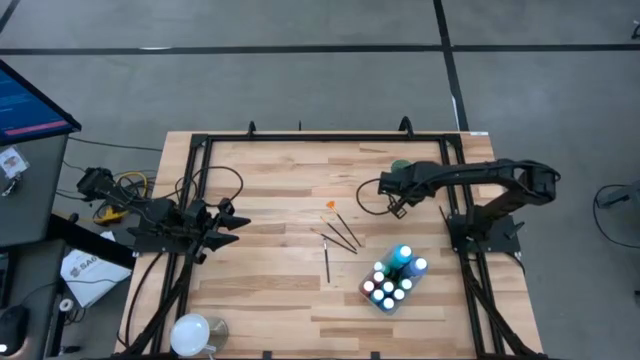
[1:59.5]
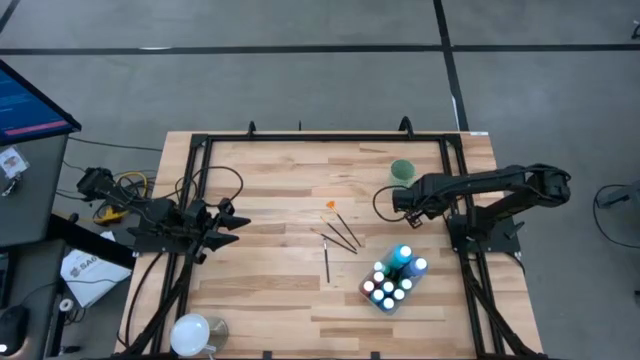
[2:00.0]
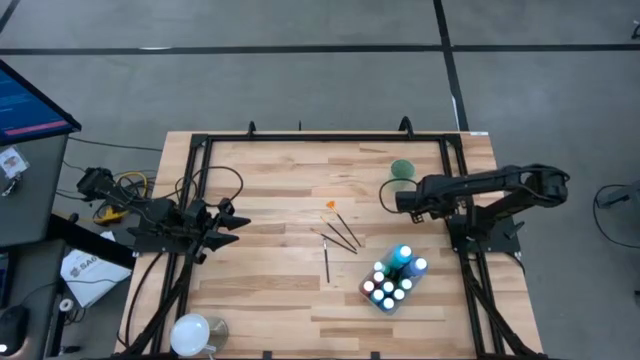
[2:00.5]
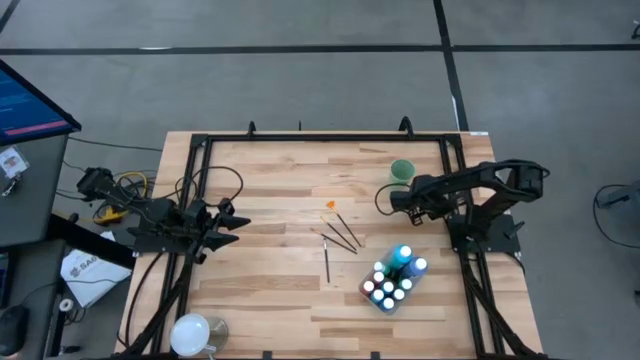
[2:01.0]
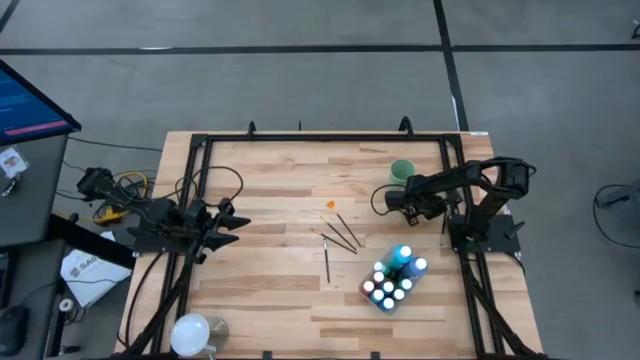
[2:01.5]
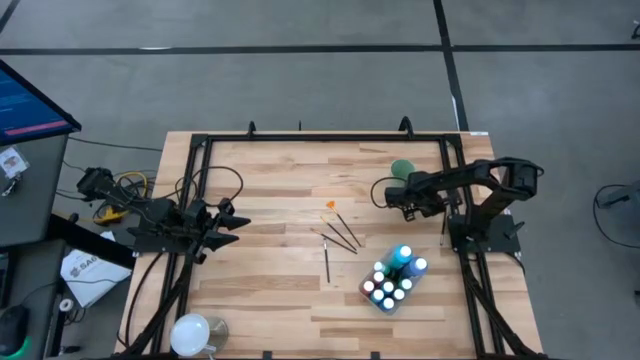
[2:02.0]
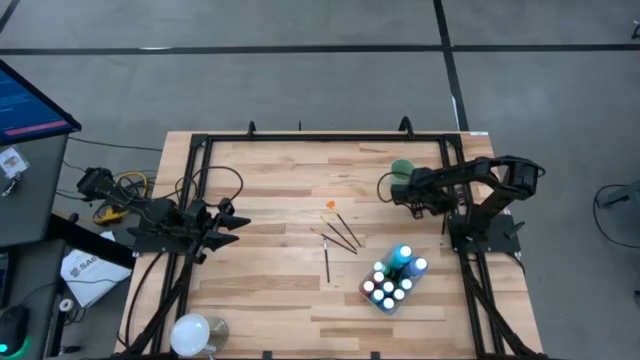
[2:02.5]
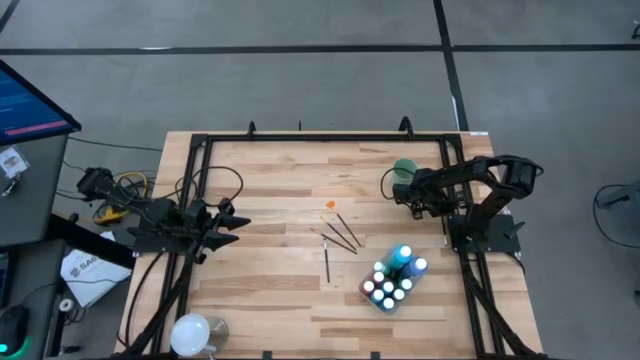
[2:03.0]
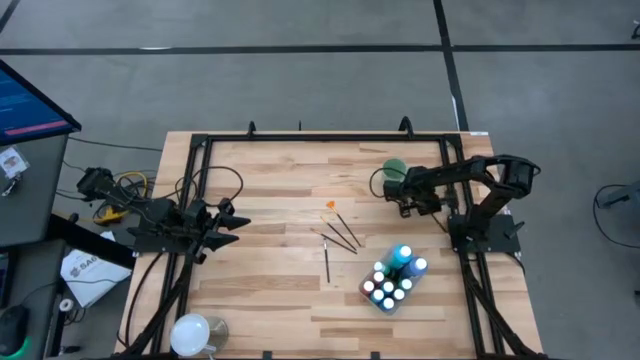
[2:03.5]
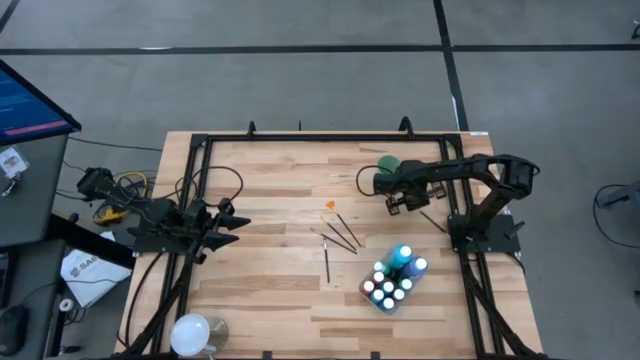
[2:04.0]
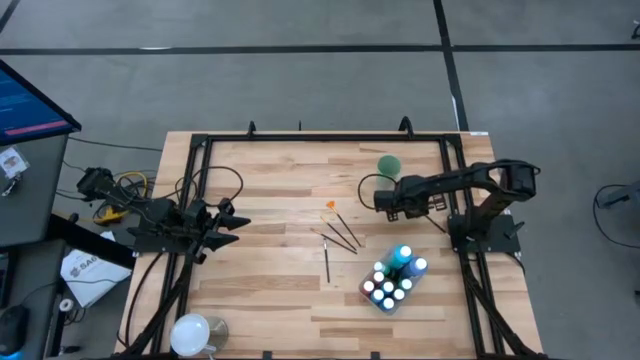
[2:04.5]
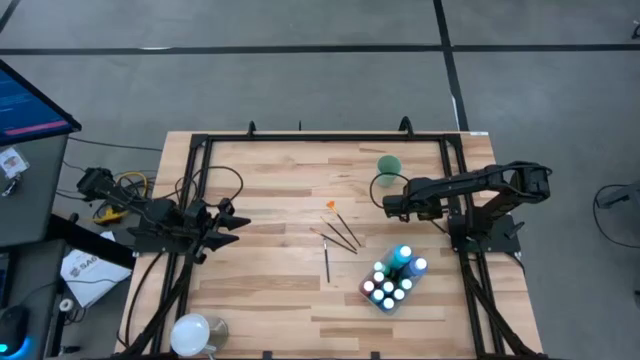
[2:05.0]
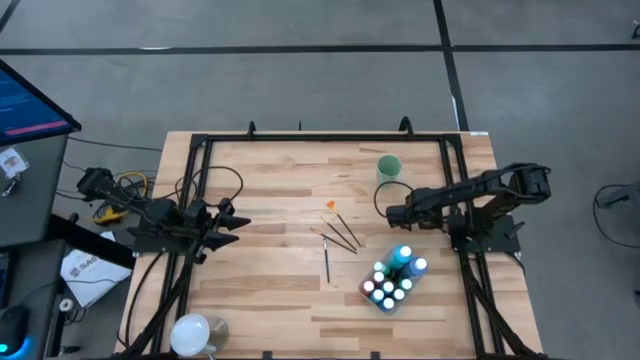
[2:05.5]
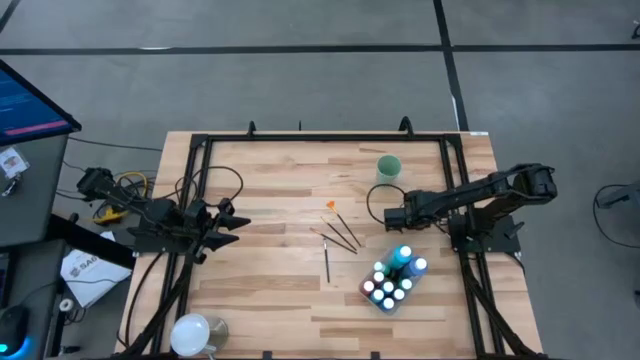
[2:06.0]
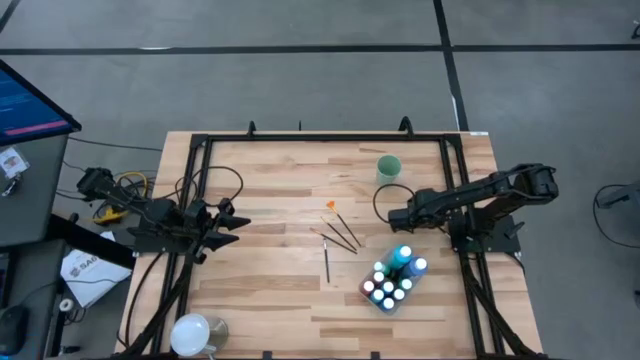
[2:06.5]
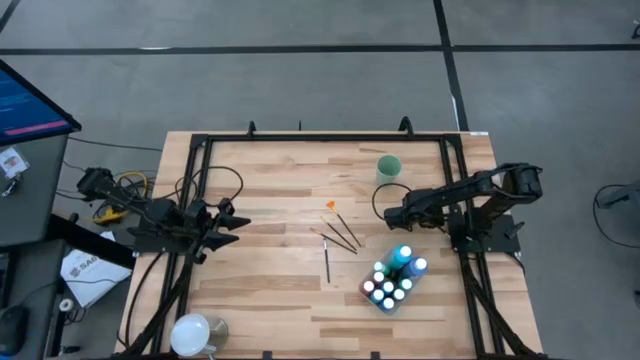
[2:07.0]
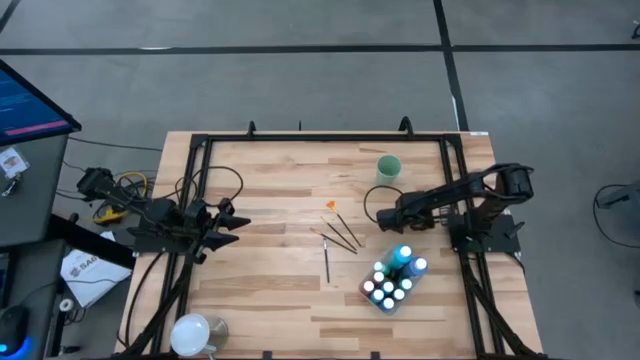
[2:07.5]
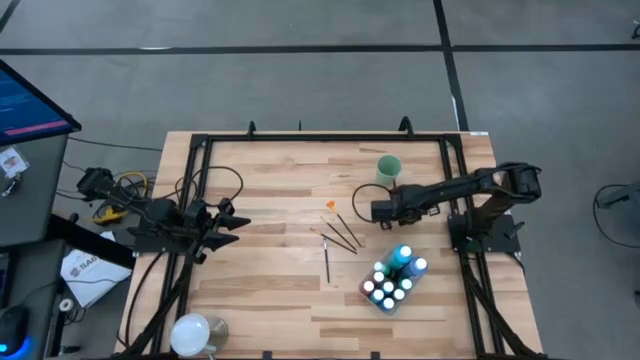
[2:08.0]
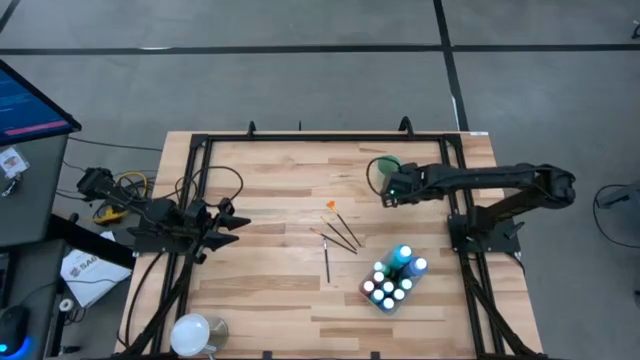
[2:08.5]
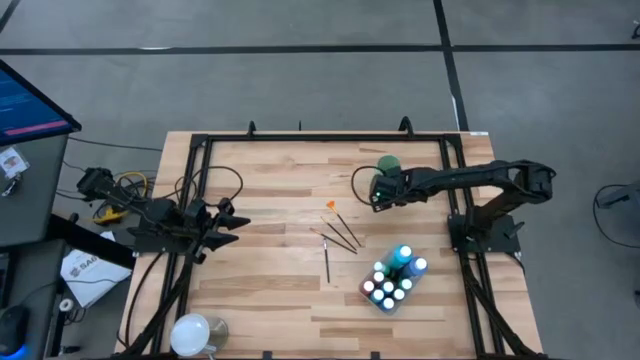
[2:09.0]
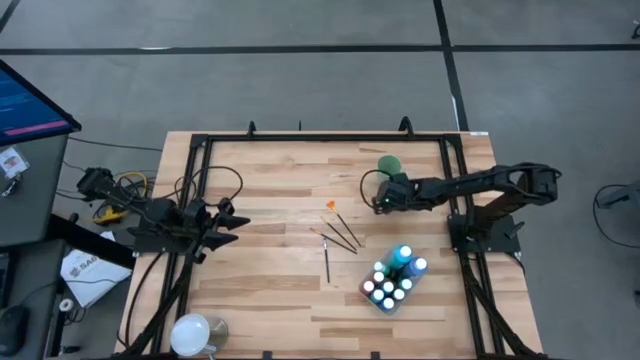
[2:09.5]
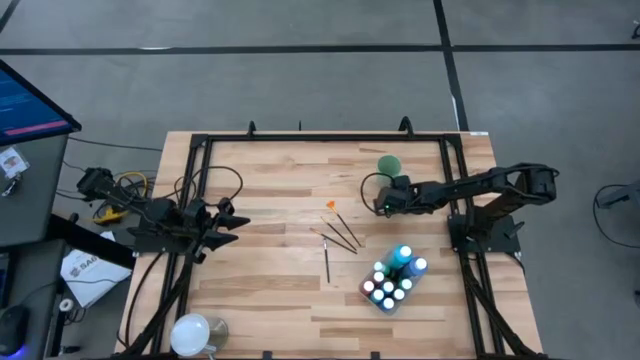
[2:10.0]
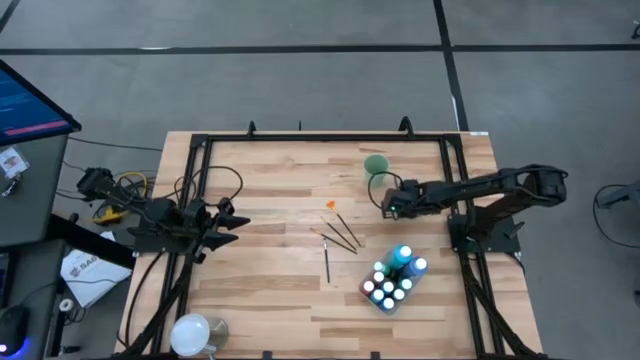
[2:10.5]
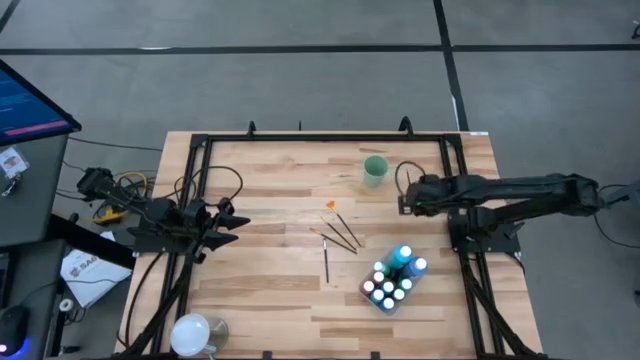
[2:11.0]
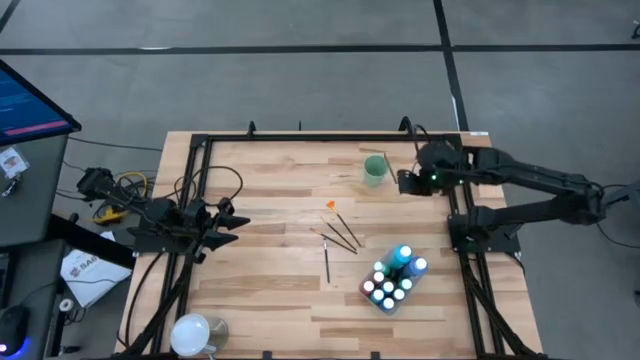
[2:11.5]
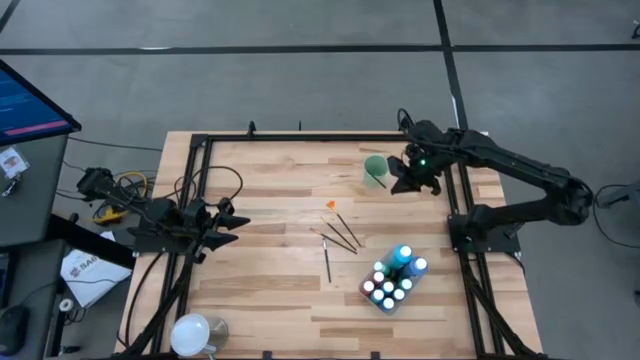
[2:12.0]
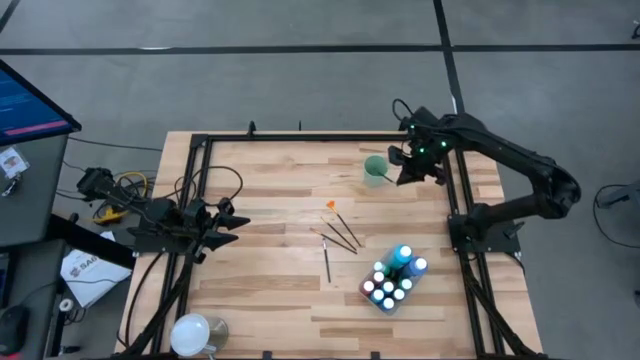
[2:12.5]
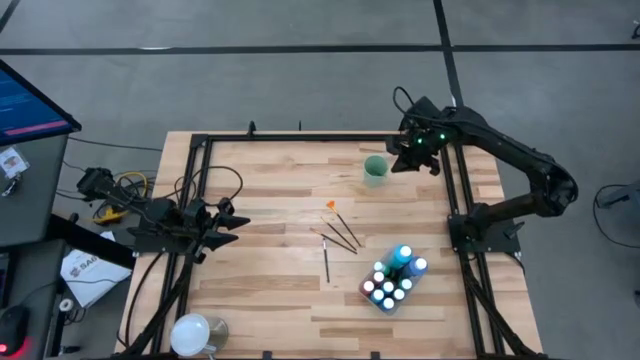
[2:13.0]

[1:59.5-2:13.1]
Task: Pick & Place Paint Supplies
Adjust the green cup

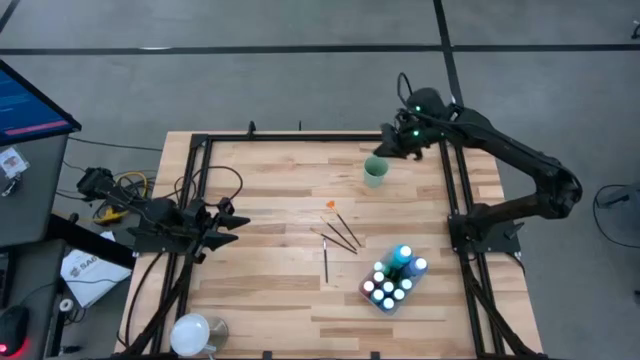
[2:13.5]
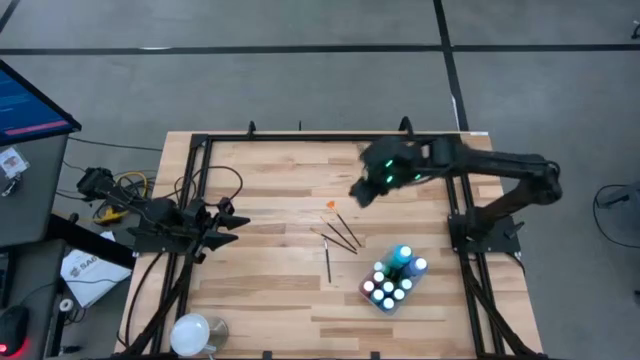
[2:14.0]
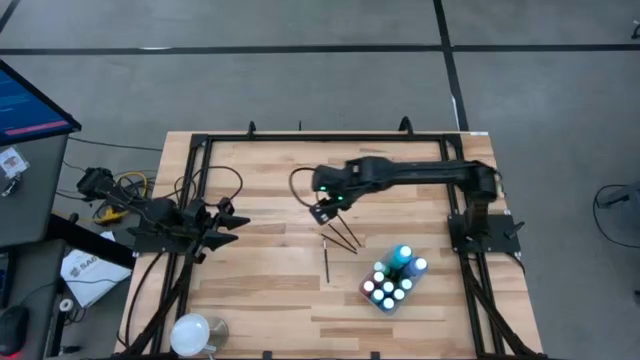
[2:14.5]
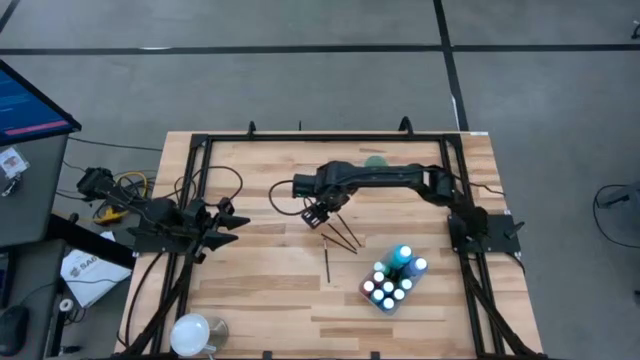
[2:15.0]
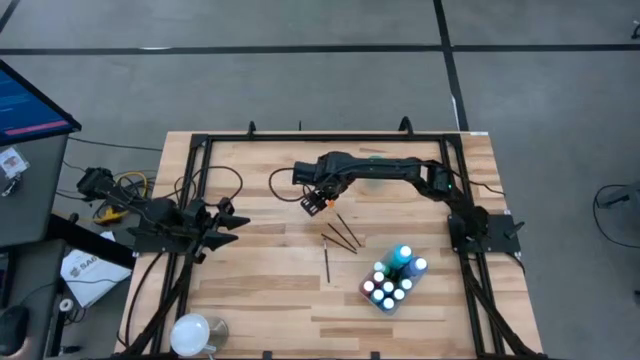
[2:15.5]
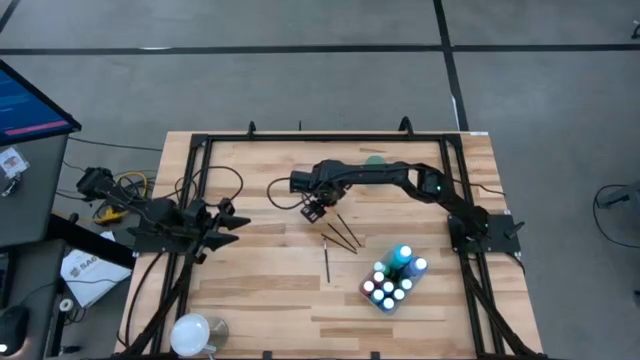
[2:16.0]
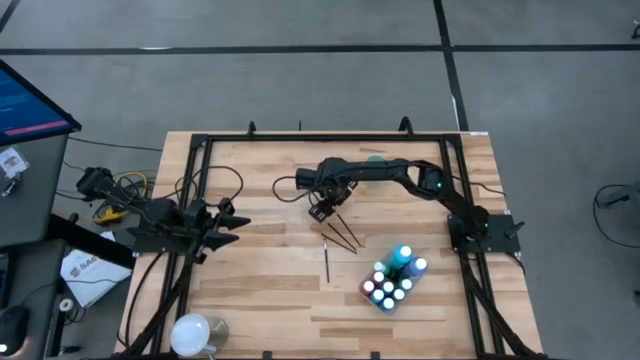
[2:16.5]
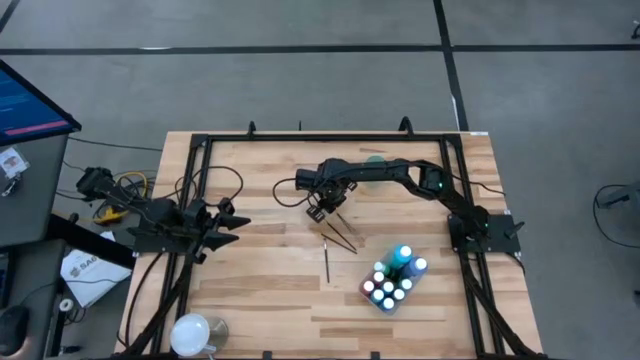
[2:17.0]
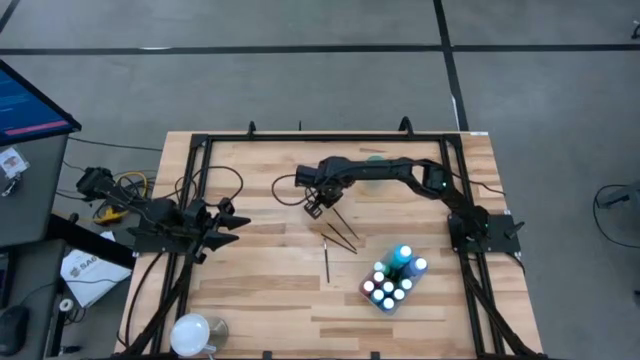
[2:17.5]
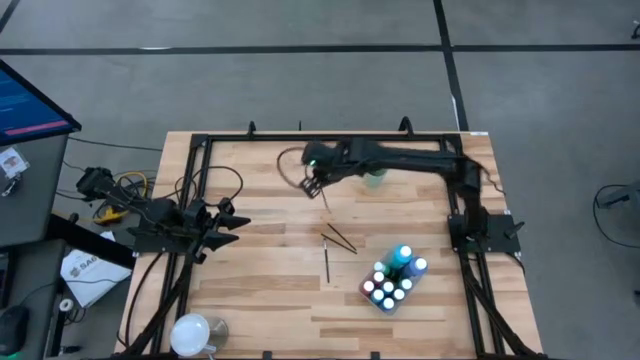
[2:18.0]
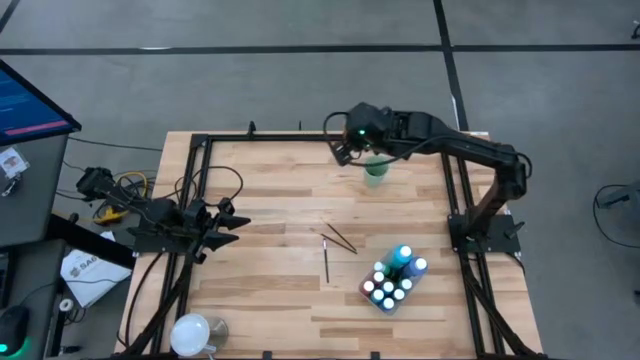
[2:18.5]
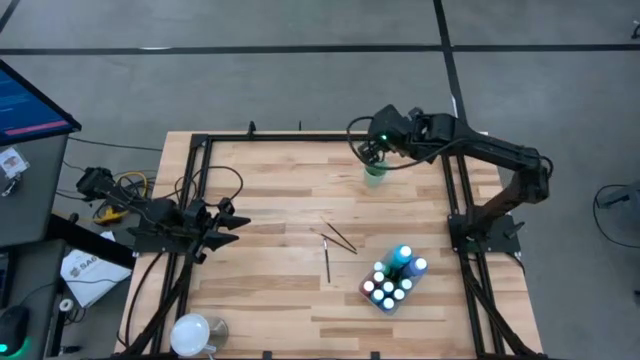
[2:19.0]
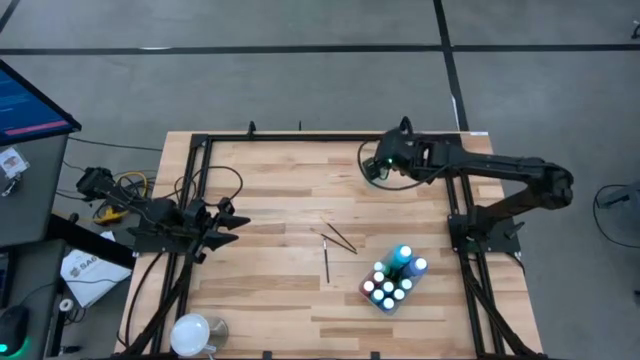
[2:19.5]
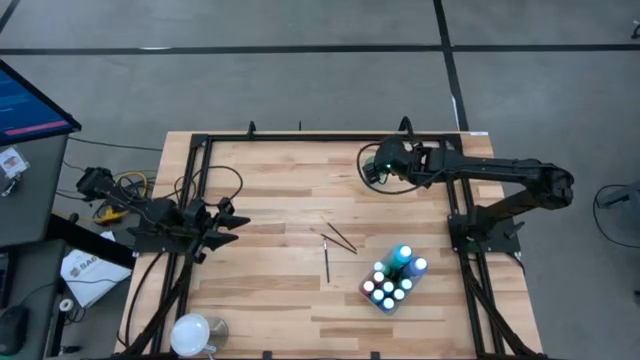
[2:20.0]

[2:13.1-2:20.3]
Put the black paint brush into the green cup
